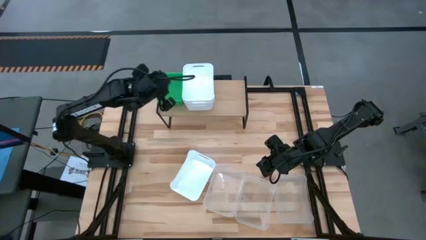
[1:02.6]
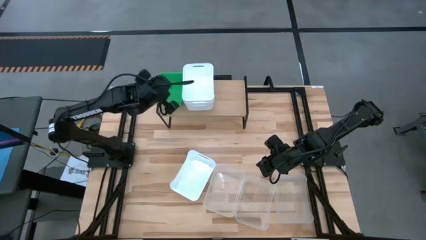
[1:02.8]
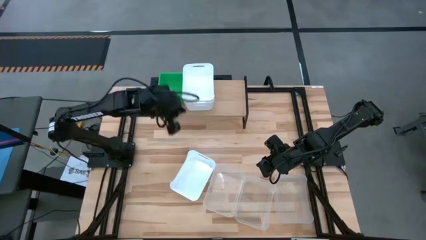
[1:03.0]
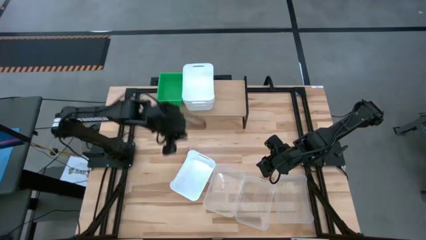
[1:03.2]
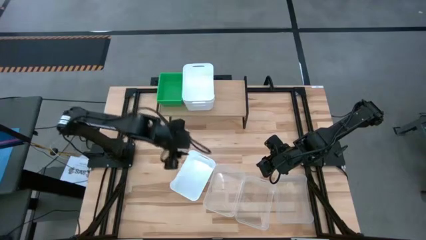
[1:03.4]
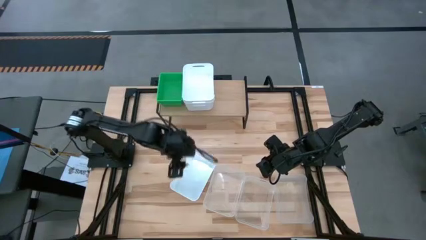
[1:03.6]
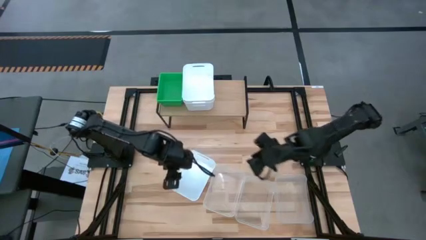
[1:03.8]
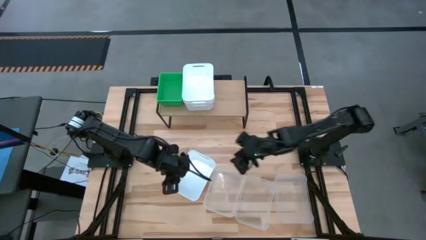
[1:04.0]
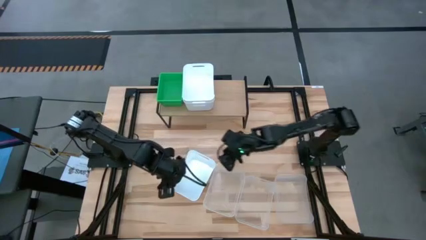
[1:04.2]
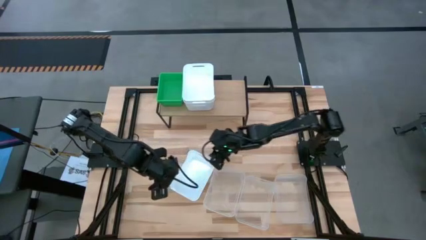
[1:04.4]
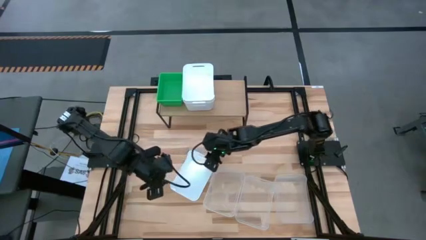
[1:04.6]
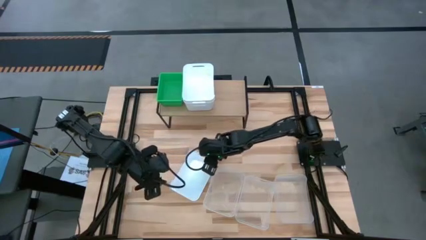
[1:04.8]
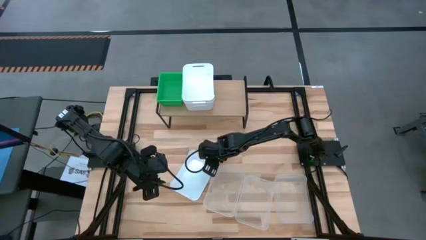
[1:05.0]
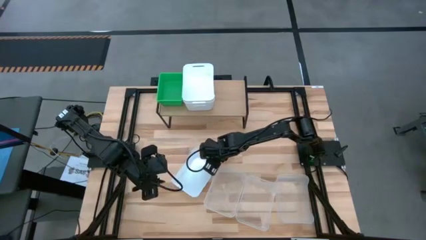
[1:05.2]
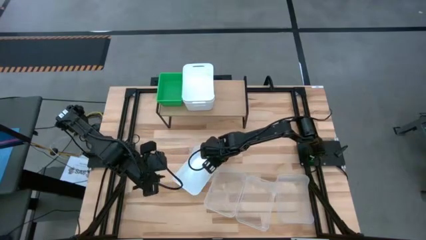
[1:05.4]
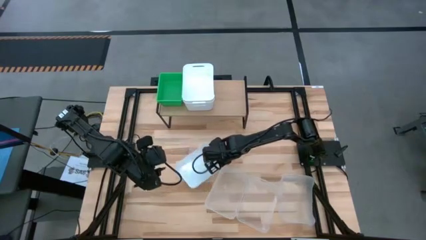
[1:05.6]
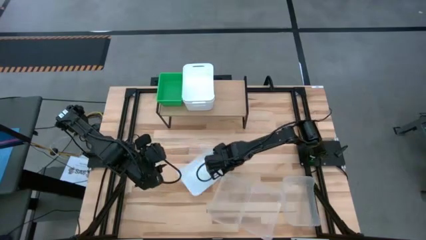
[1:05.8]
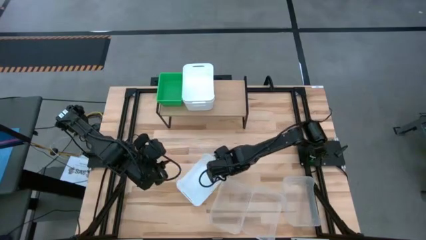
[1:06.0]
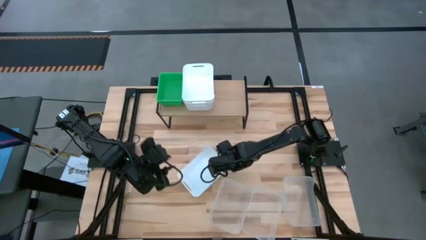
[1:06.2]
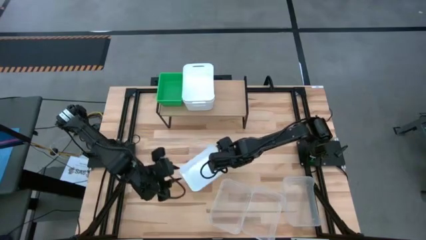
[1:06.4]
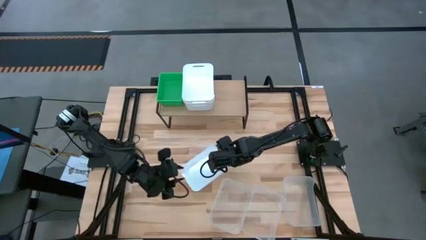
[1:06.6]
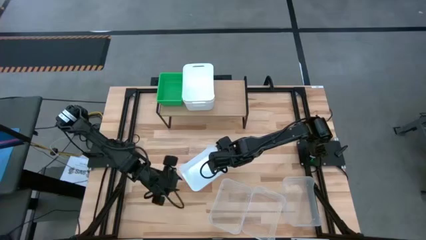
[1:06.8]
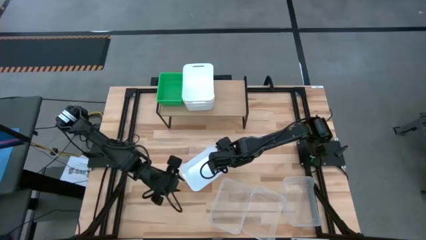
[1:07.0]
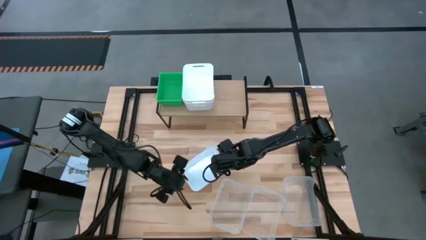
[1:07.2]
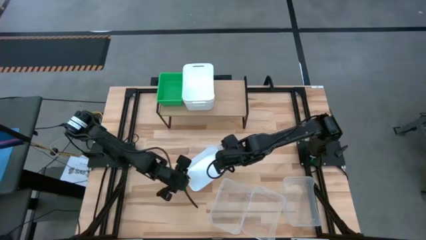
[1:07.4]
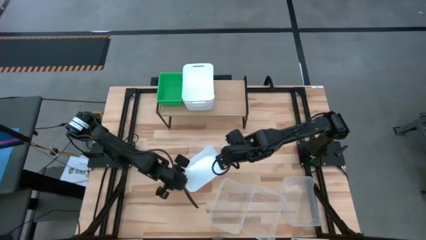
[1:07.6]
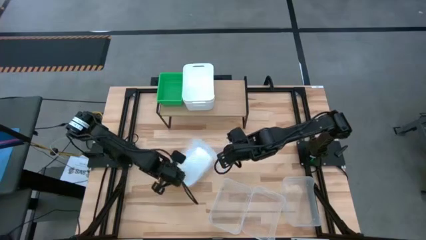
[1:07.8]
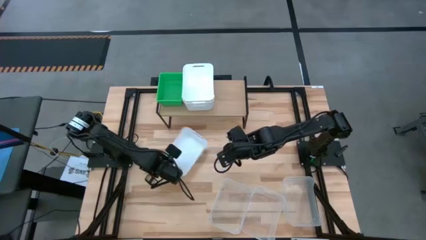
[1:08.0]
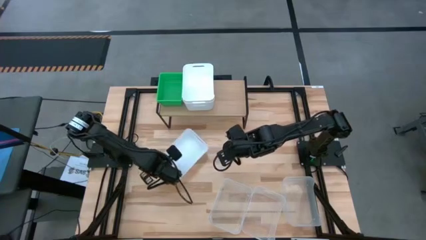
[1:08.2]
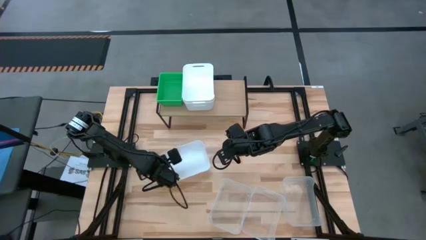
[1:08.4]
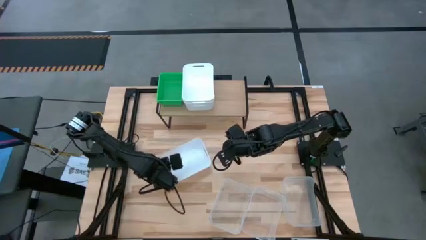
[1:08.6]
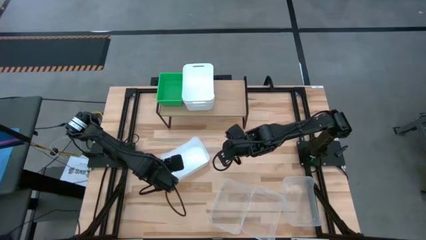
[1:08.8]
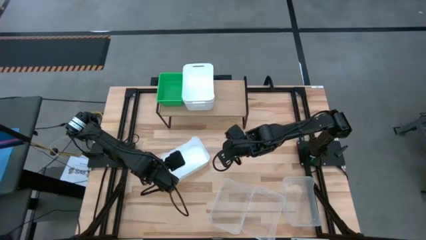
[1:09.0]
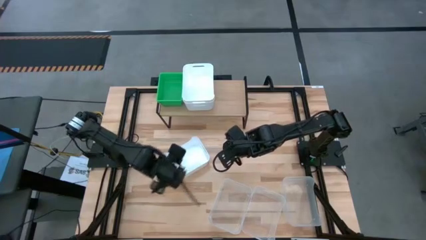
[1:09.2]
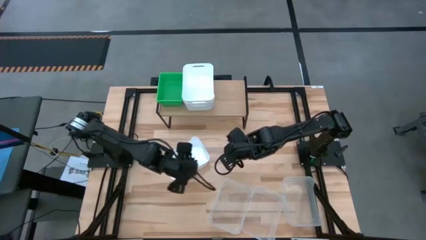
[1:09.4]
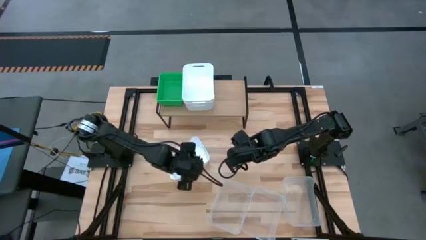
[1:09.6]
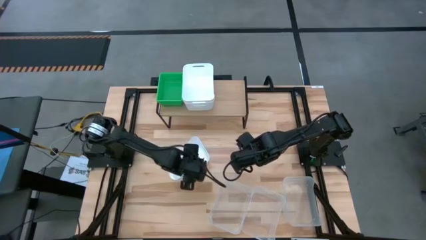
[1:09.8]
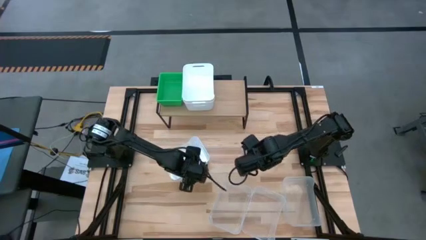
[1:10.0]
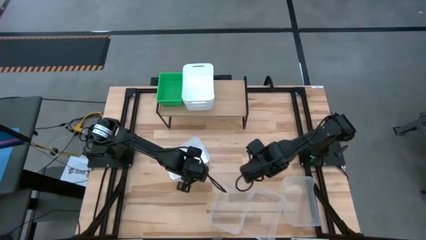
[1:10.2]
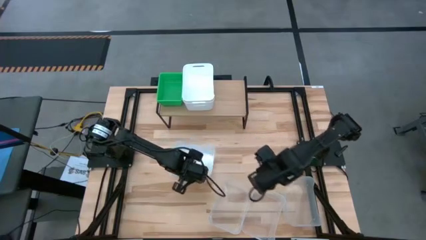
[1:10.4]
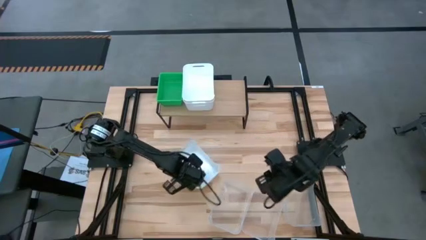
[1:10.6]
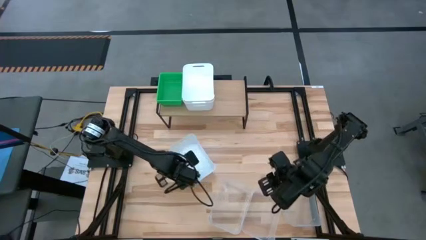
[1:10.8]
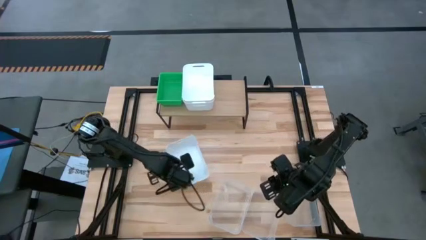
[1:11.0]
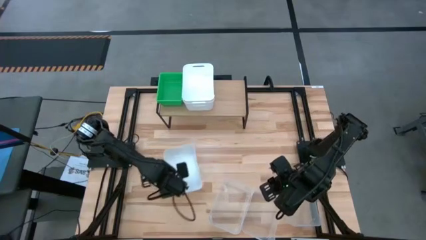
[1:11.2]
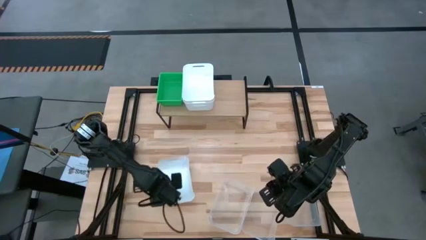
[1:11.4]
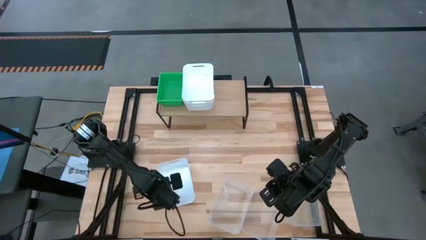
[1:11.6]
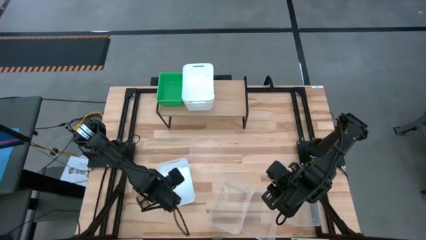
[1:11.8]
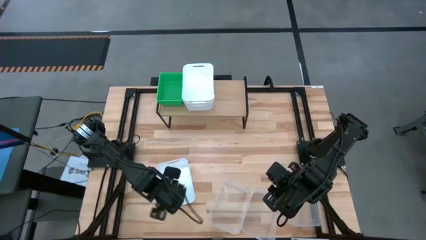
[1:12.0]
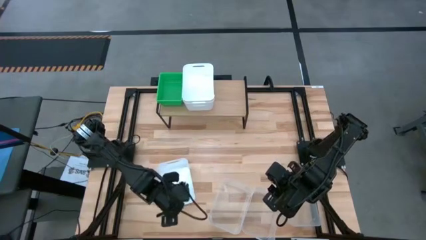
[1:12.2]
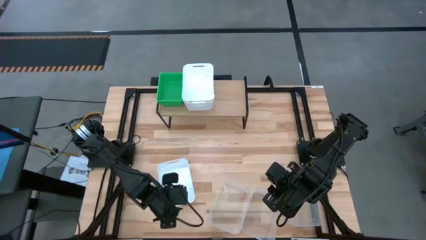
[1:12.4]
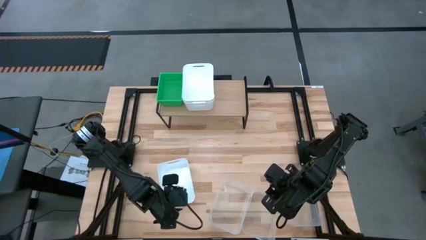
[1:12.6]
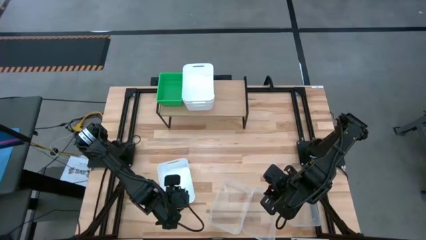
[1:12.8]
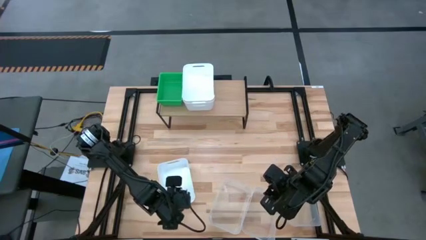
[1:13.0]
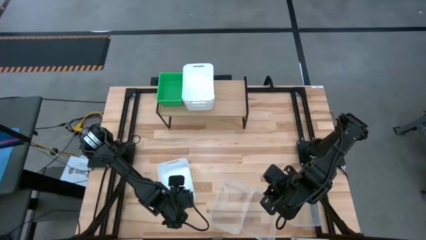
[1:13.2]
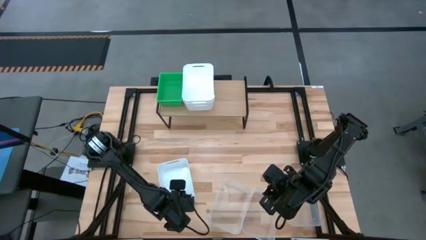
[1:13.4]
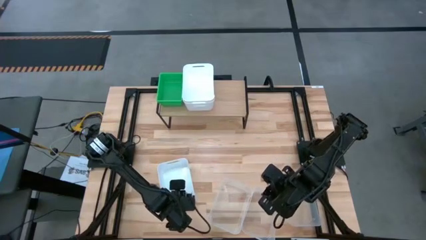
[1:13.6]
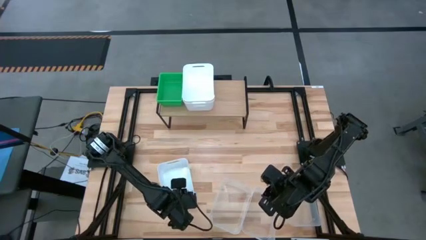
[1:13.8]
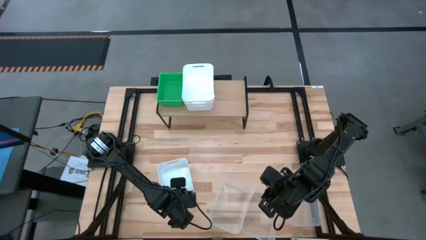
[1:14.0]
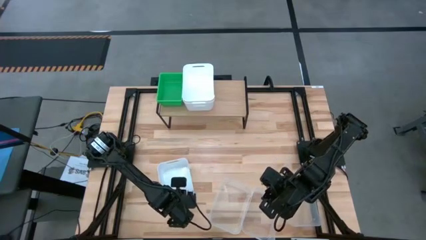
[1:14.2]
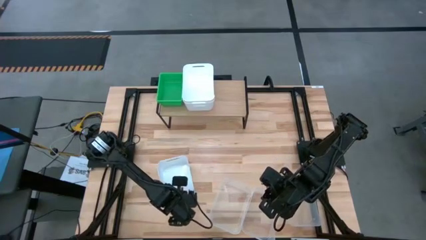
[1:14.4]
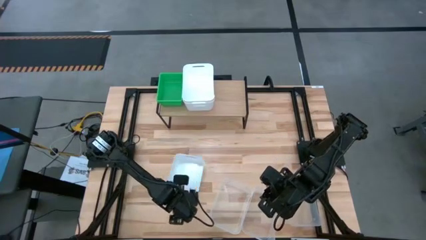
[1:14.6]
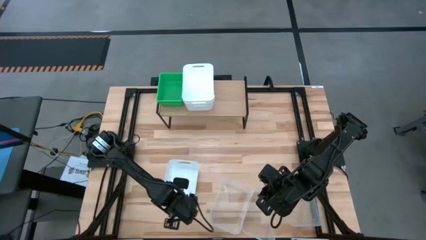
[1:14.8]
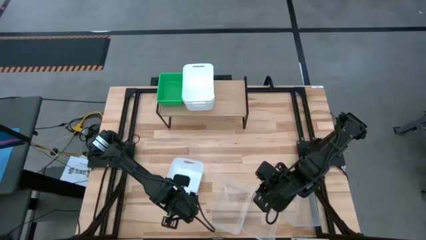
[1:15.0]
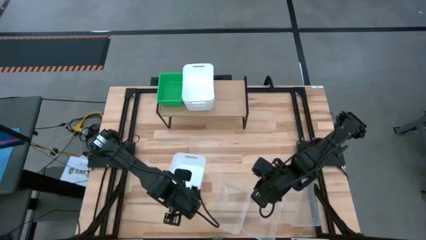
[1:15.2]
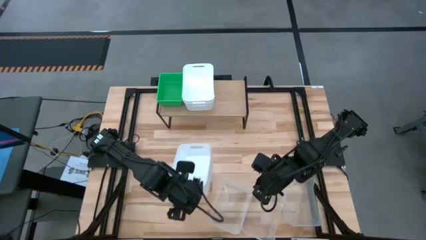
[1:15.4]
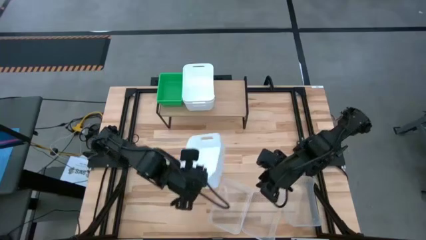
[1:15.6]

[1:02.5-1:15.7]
Task: Stack baskets on shelf by color
Stack the white bin on top of the white bin on the shelf

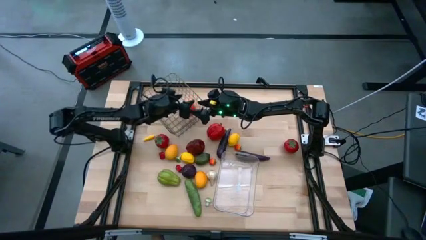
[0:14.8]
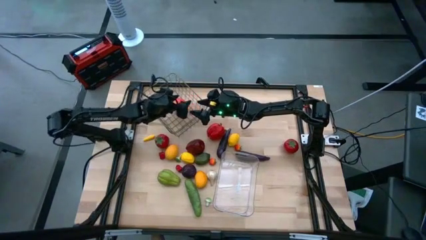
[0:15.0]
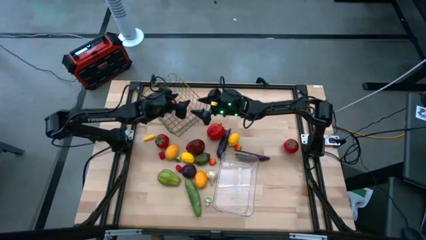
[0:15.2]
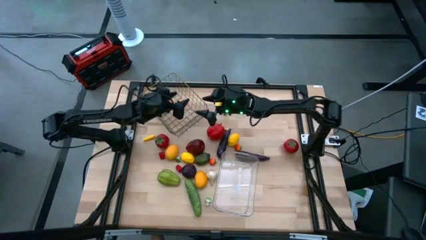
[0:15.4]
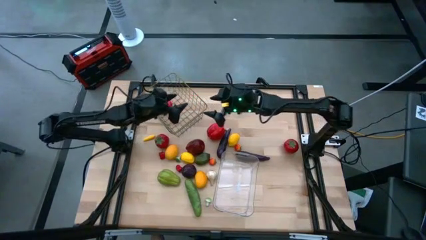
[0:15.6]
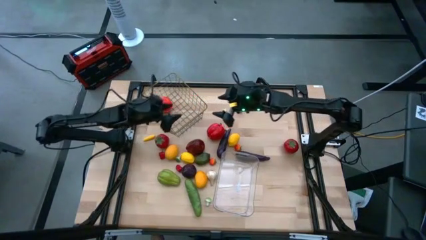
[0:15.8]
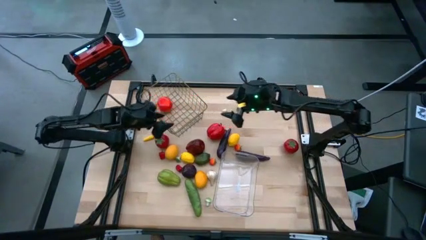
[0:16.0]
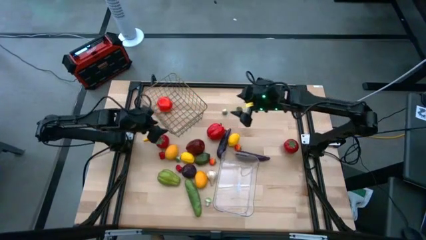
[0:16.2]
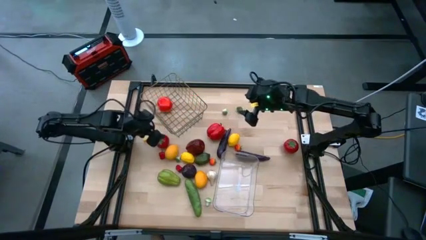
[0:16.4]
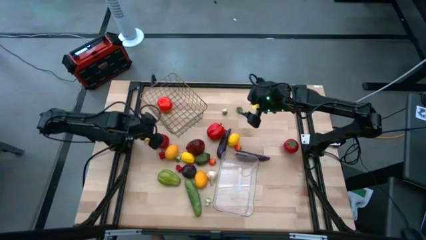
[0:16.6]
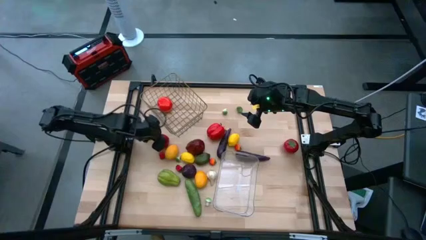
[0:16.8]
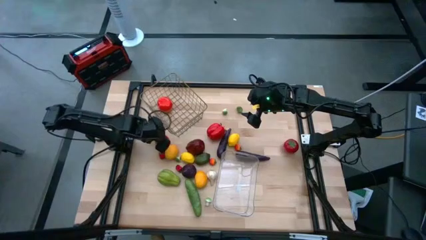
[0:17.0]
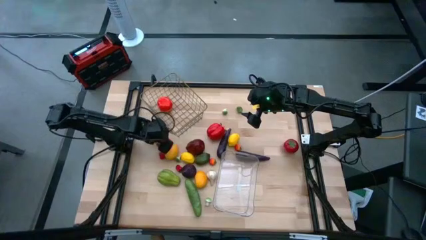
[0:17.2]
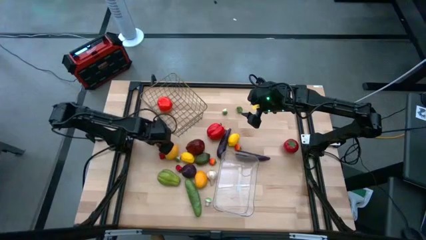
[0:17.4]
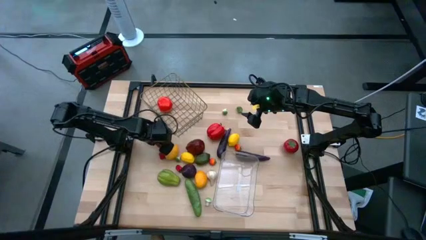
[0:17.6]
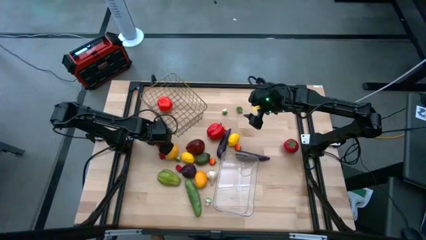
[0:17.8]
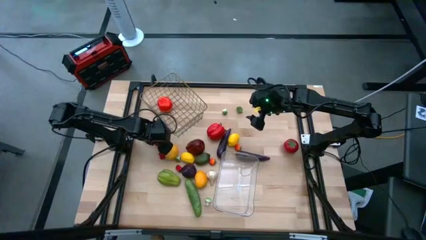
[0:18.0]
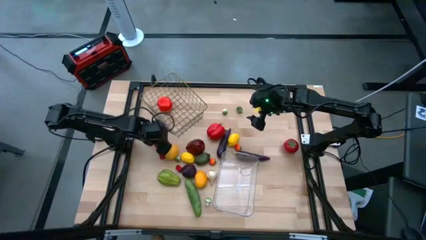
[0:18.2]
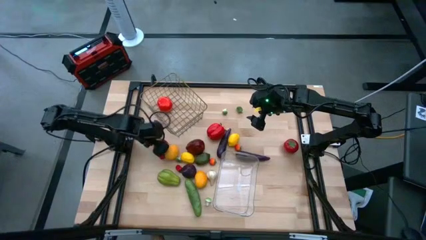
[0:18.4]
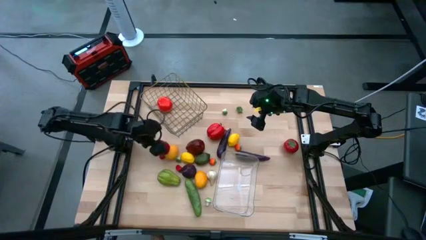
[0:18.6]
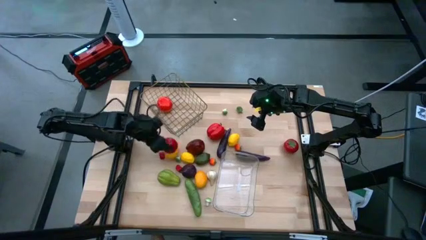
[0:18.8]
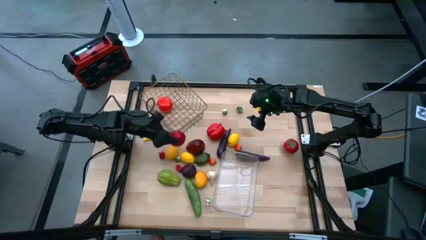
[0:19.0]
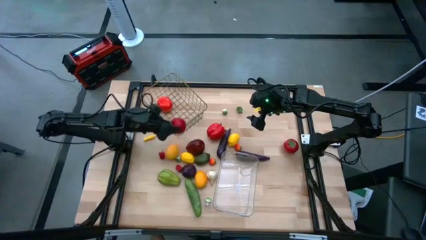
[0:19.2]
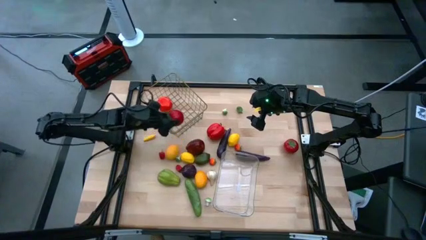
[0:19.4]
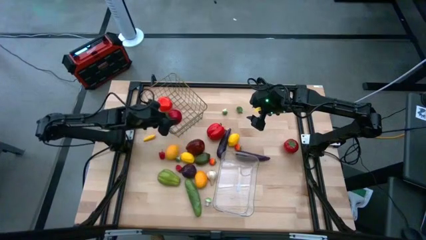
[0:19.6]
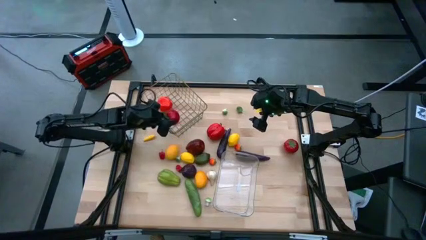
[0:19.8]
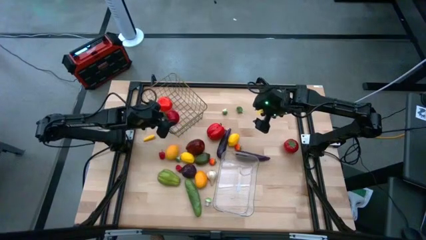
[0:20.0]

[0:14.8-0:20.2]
Task: Sort produce into baskets
Put the large red tomato into the wire basket
